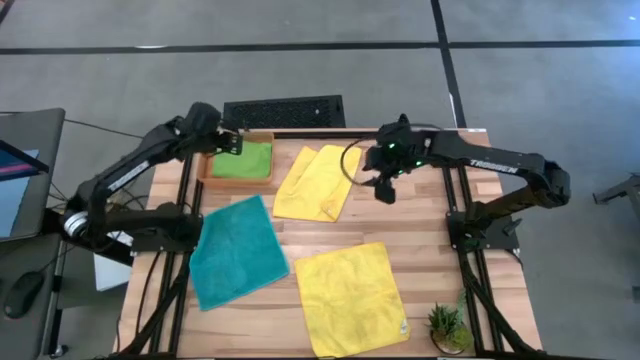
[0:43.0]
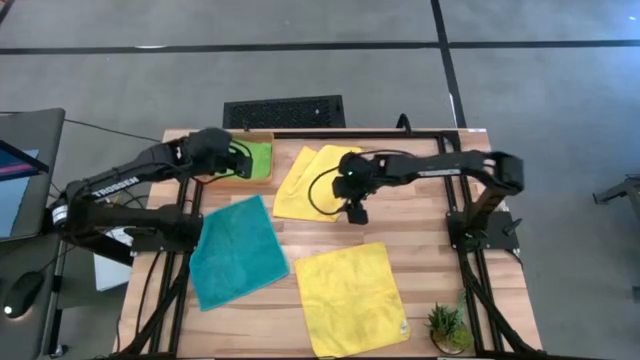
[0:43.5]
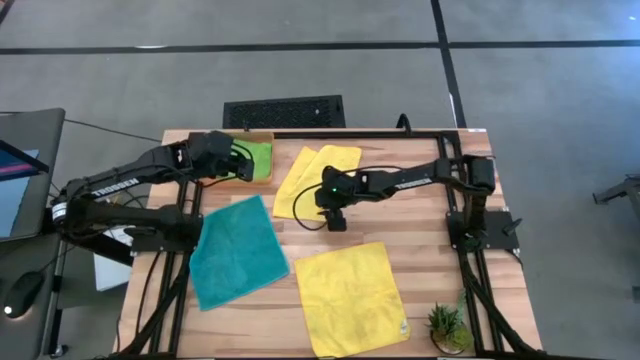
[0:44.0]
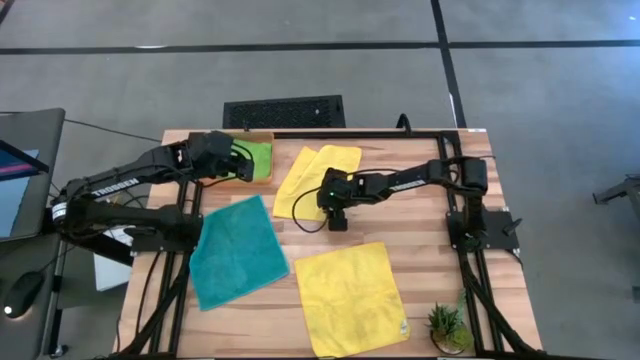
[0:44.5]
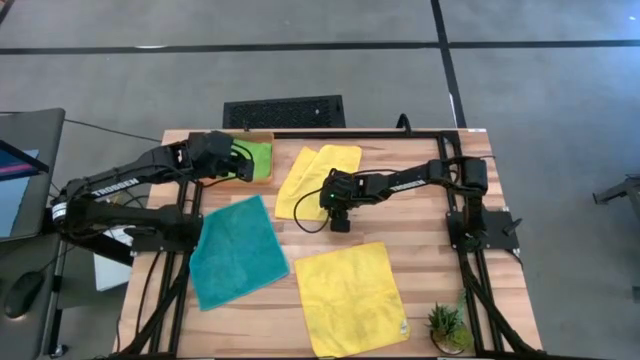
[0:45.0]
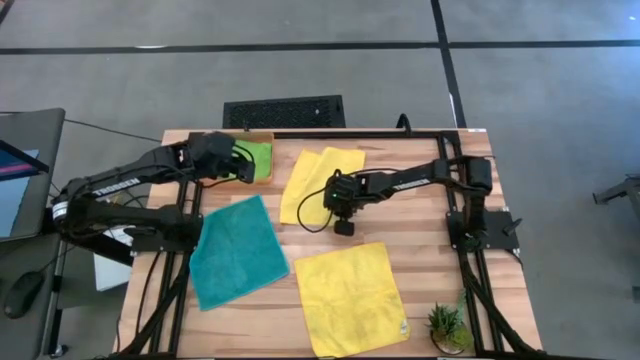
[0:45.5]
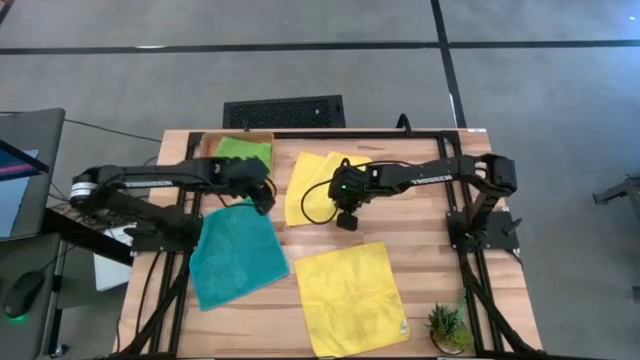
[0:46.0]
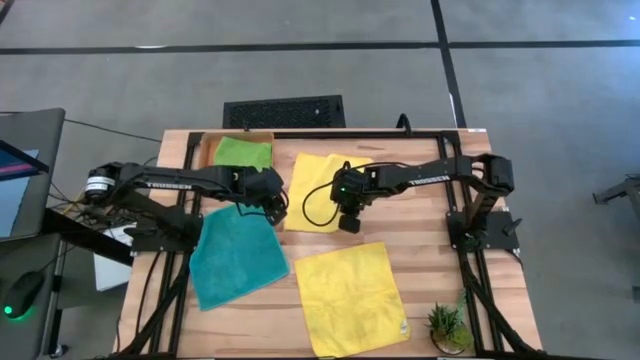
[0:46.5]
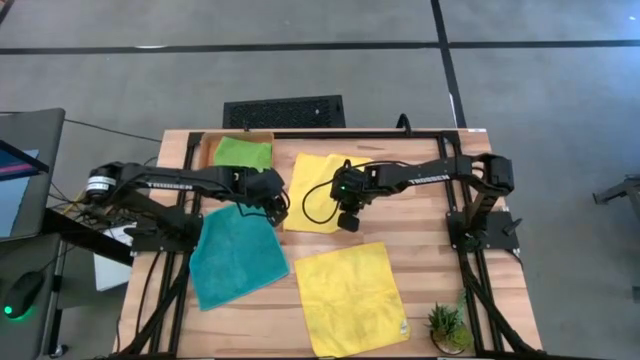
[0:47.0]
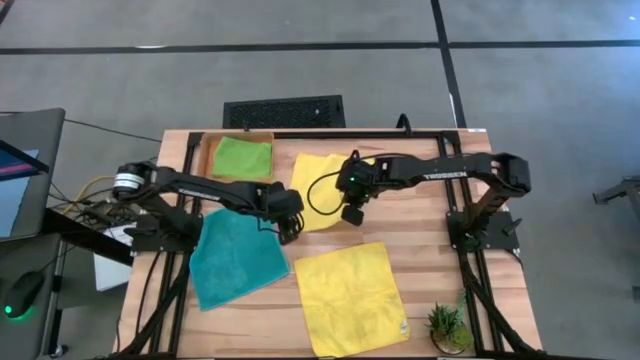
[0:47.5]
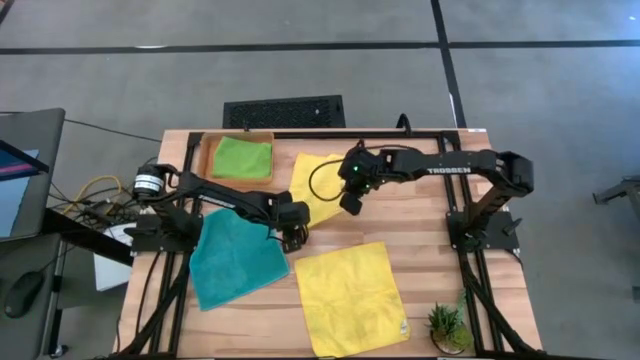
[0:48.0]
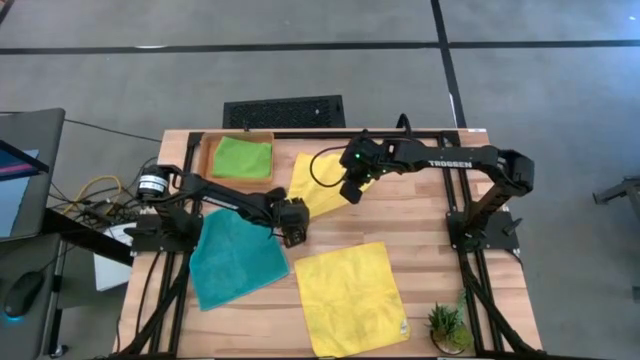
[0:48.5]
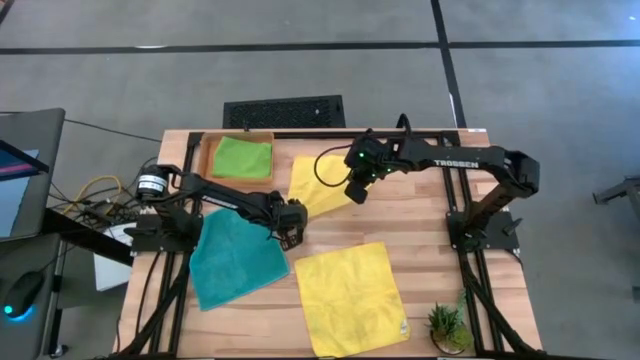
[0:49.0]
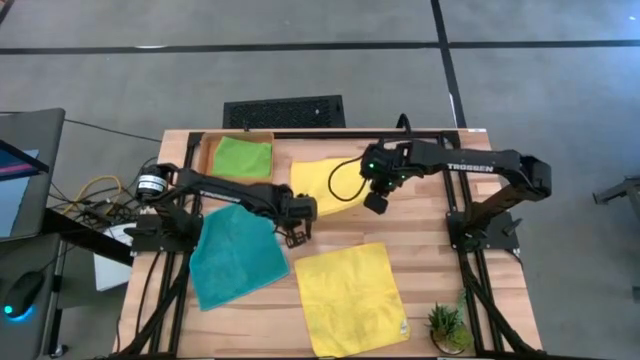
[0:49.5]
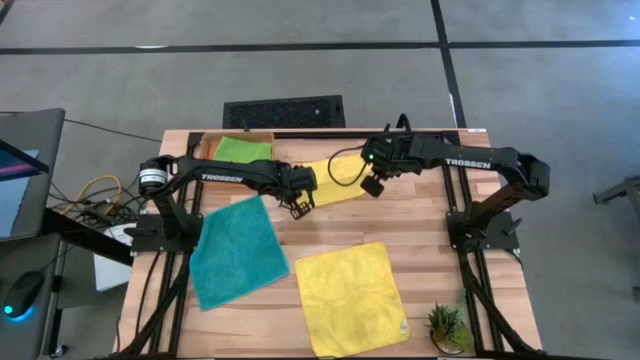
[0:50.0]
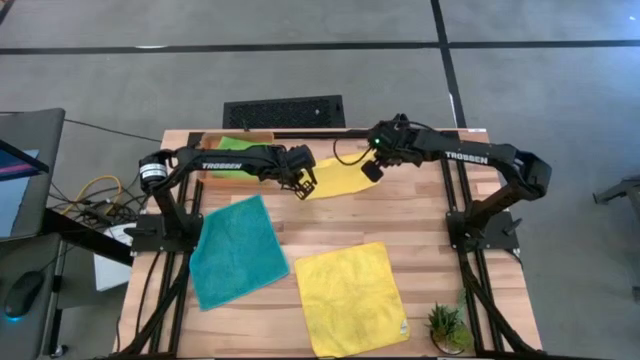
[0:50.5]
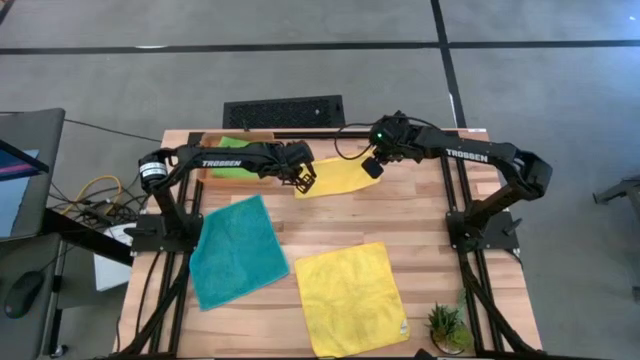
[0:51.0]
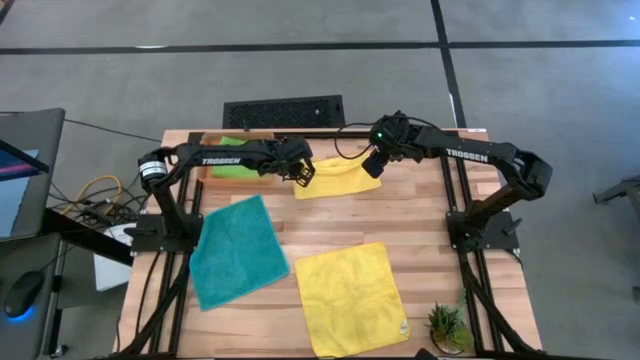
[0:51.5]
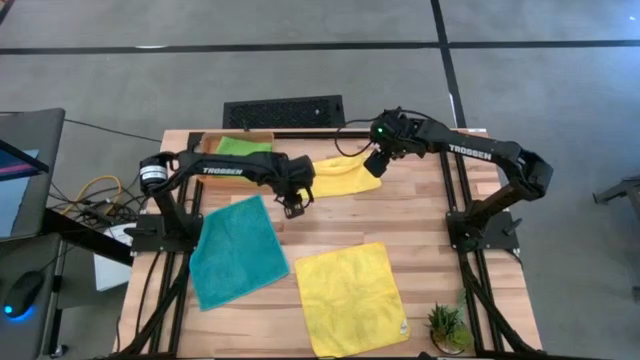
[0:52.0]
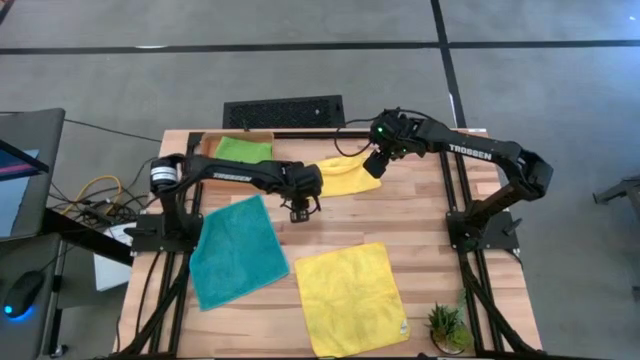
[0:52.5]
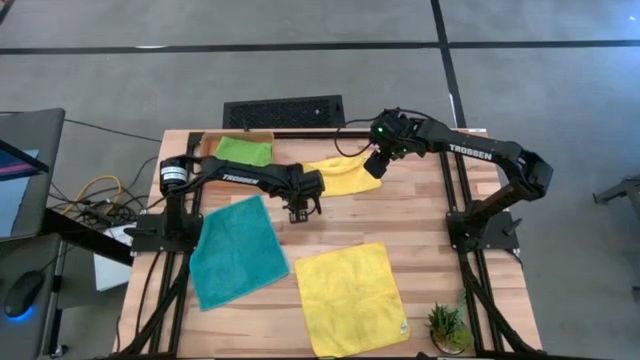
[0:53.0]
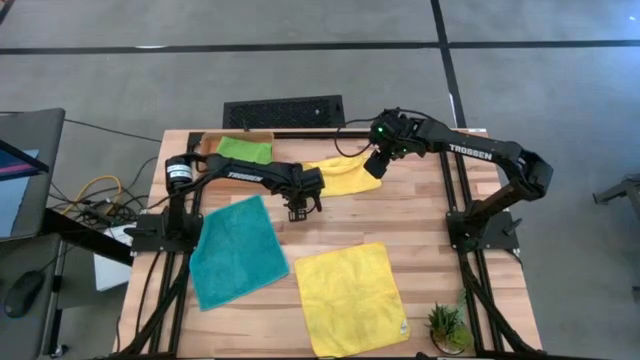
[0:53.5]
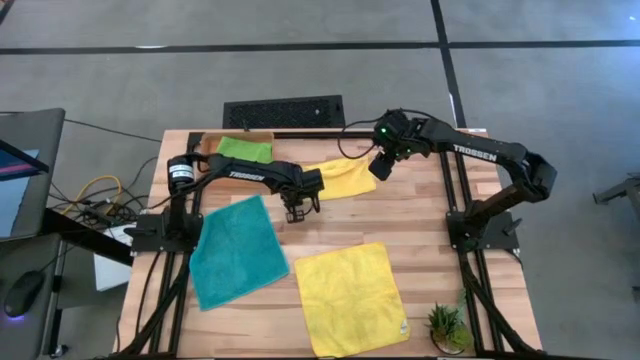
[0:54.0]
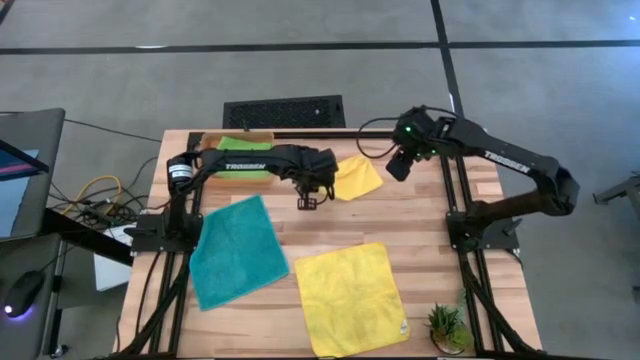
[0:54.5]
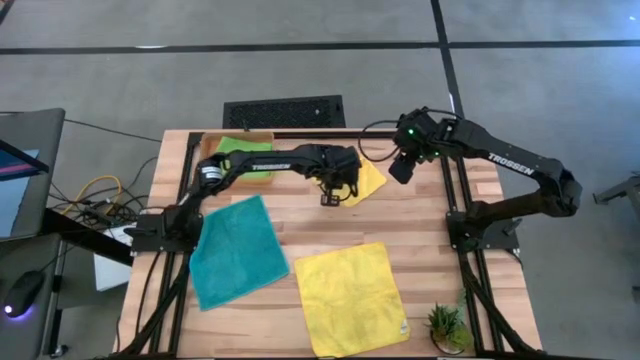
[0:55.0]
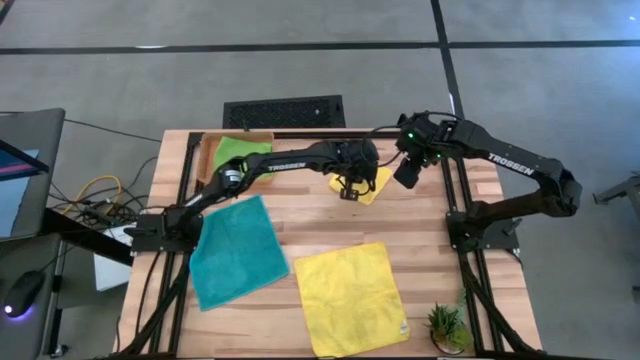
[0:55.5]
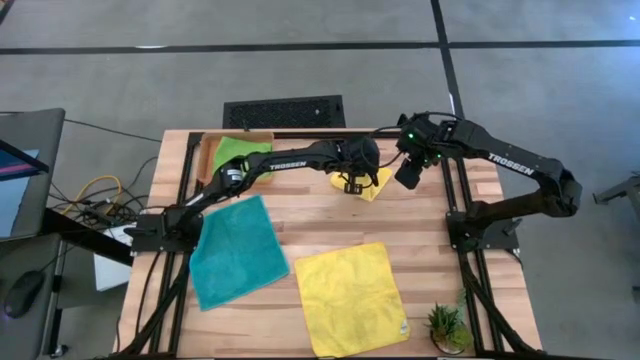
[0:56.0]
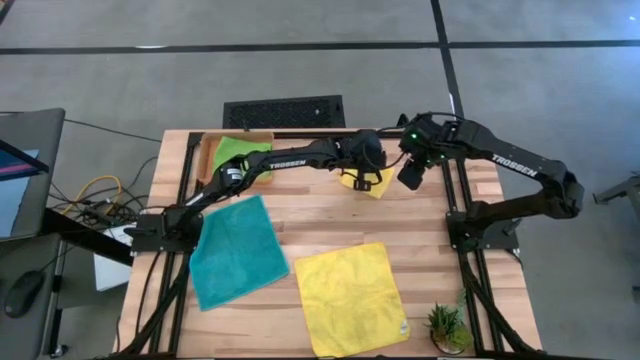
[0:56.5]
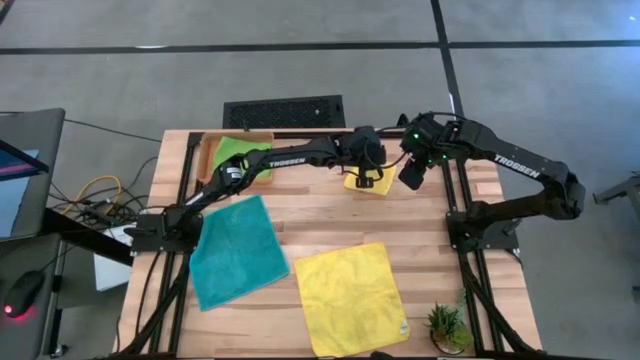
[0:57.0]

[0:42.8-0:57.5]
Task: Fold microfiber towels
Fold the top yellow microfiber towel

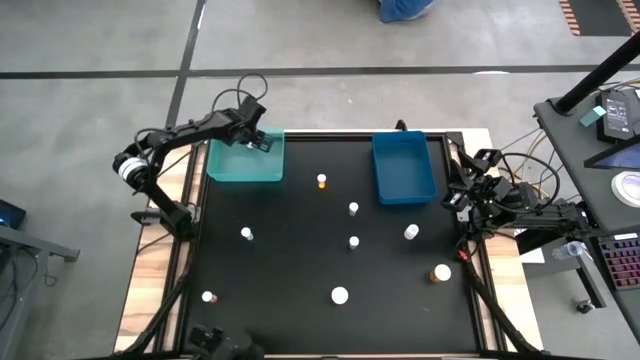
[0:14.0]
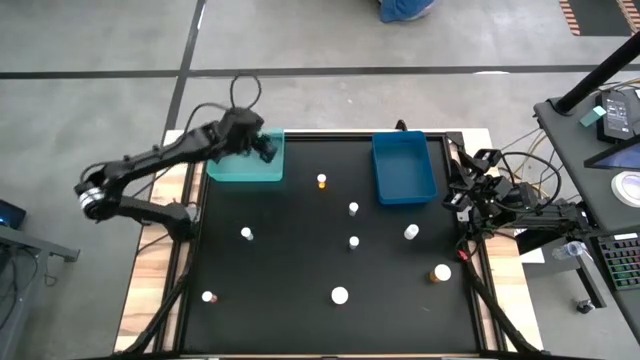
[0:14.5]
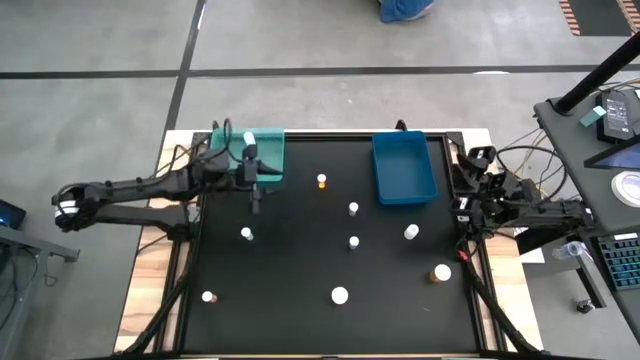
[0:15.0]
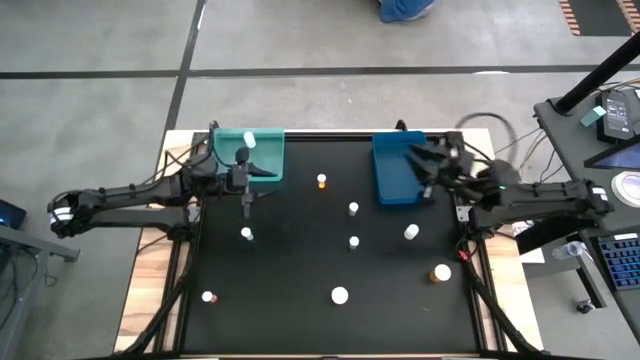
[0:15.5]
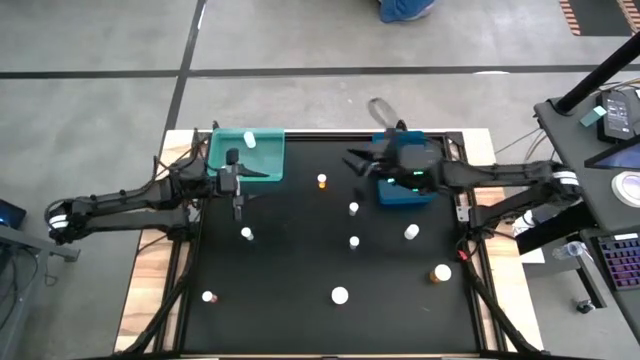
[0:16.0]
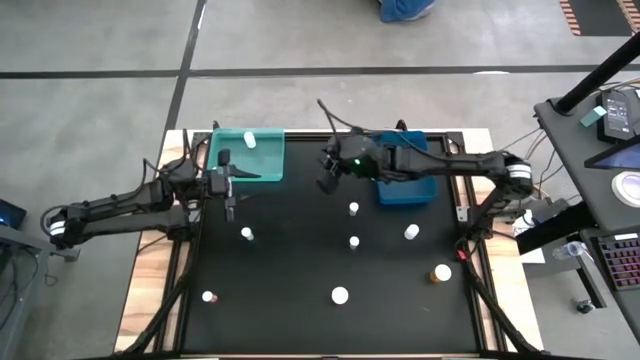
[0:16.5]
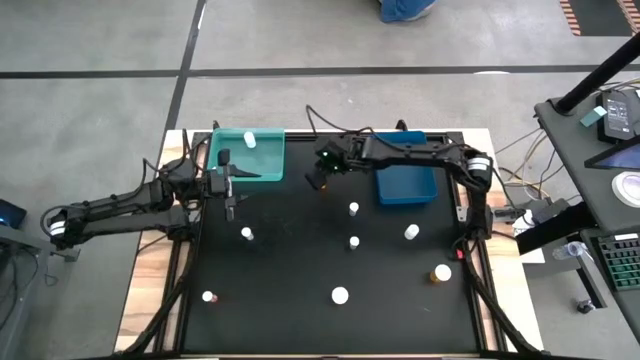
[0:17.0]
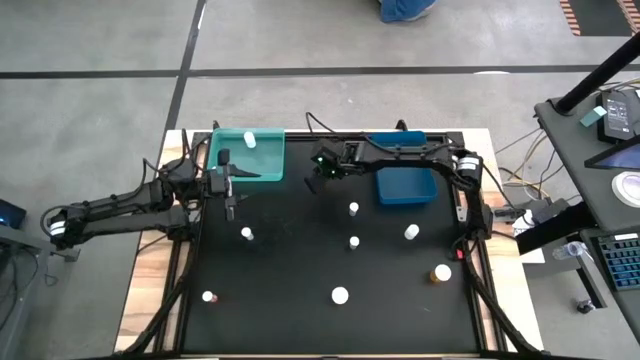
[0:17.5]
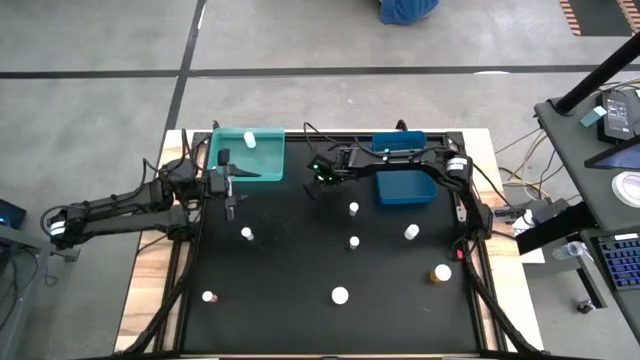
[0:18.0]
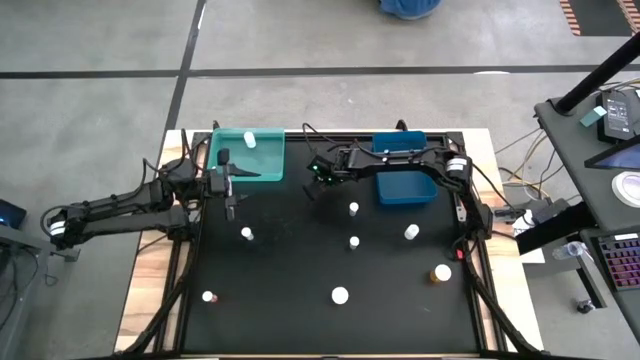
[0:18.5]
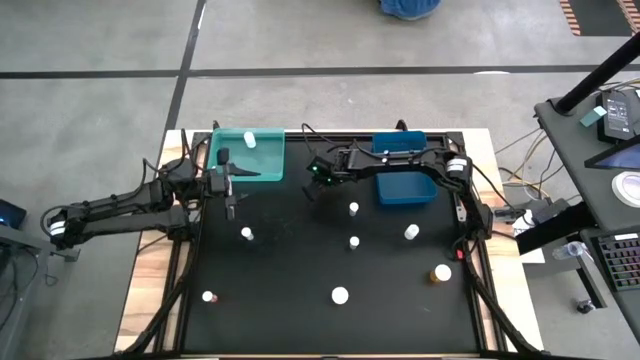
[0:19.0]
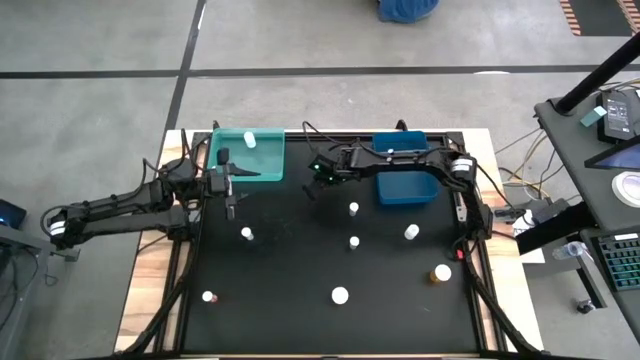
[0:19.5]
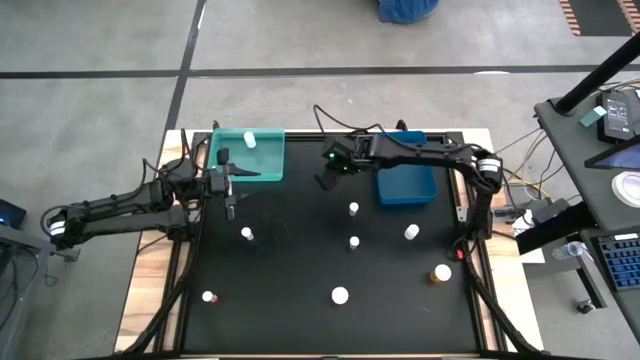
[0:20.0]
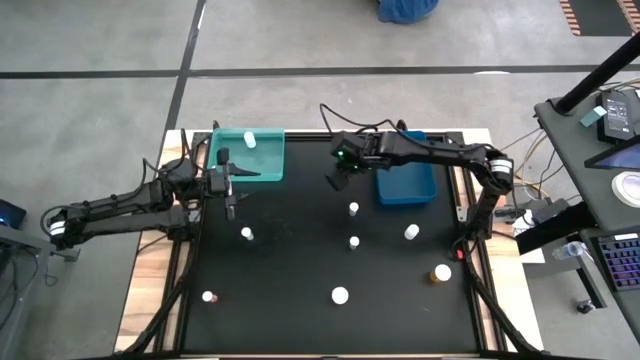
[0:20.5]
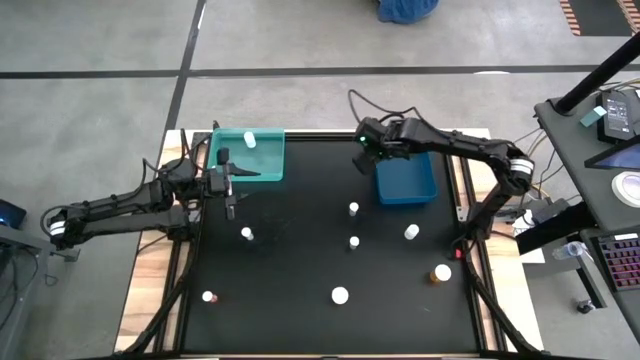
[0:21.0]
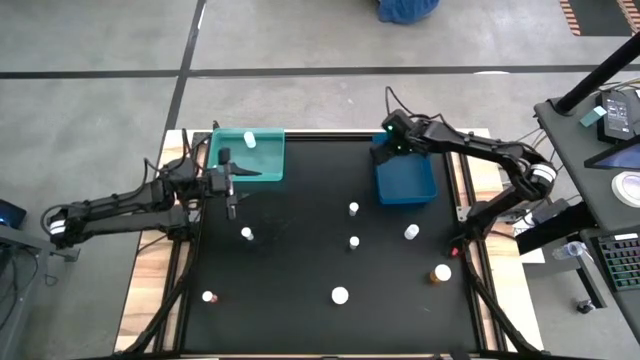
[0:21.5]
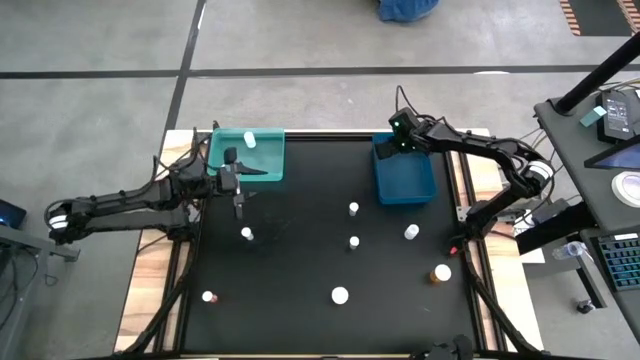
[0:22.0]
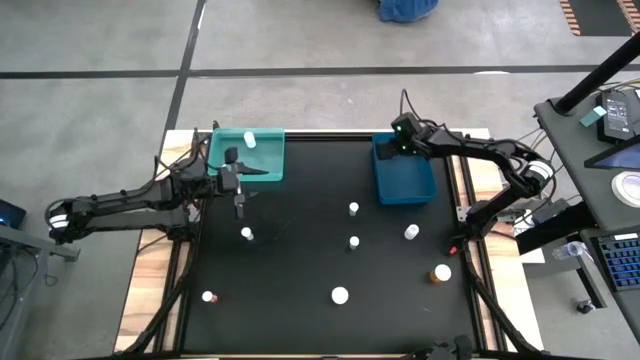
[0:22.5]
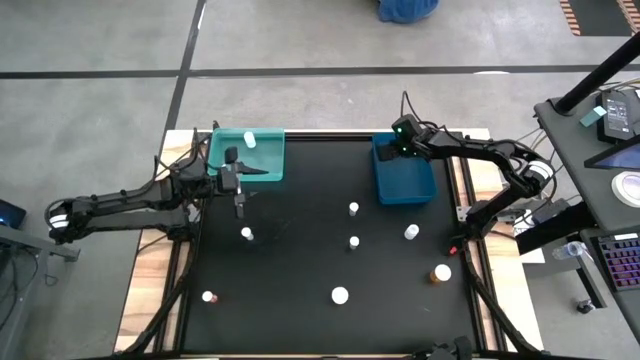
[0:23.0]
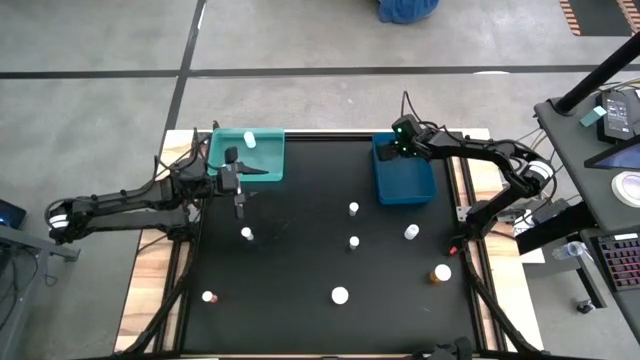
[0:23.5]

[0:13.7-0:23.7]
Task: Pick and place medicine bottles into bin by pill shape (circle, oval)
Put the orange tablet bottle into the blue bin
